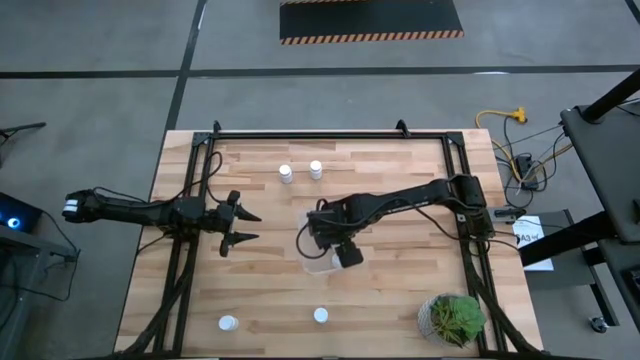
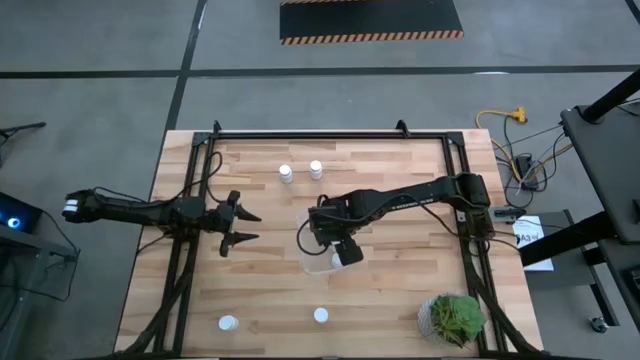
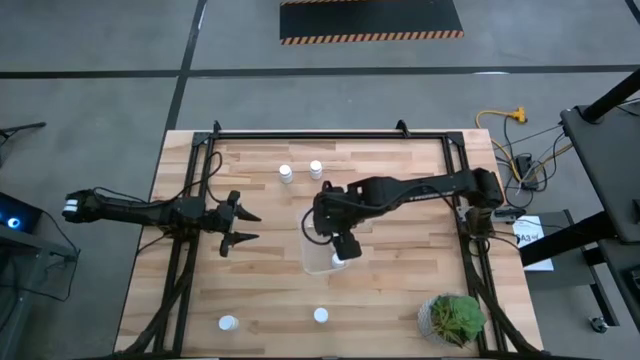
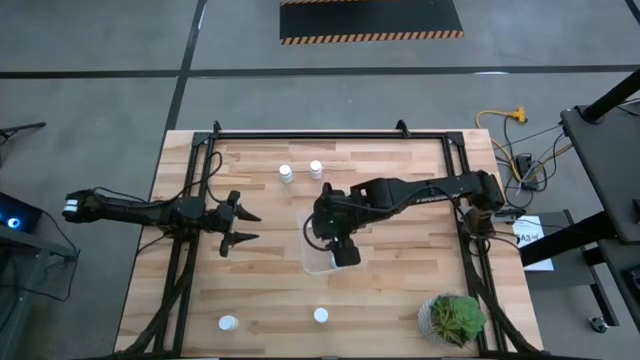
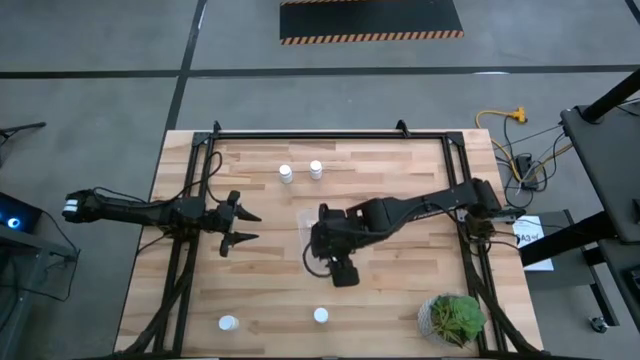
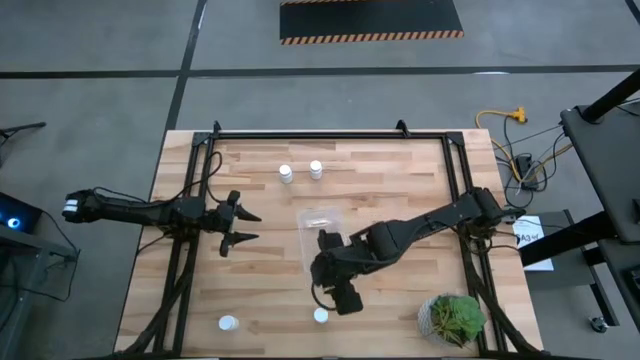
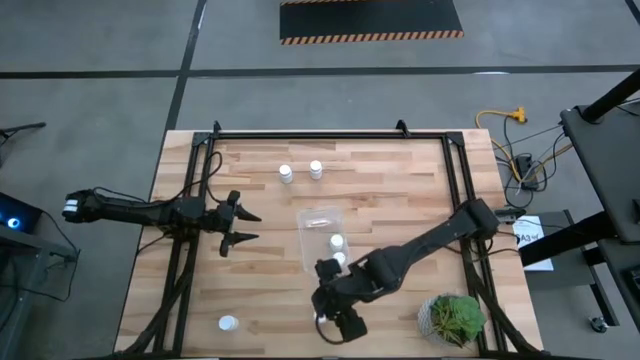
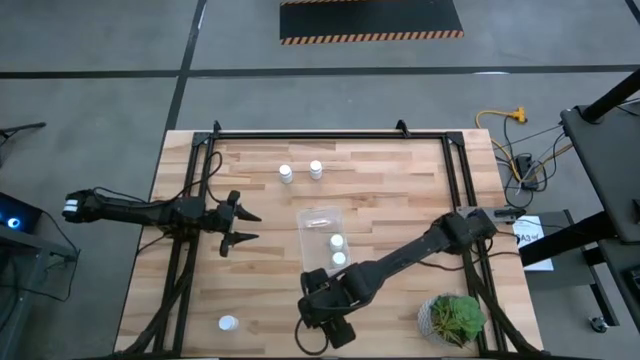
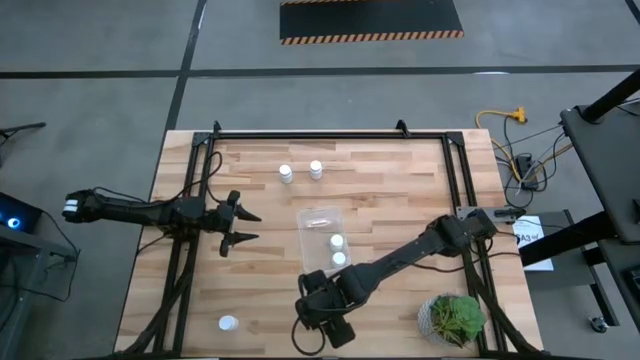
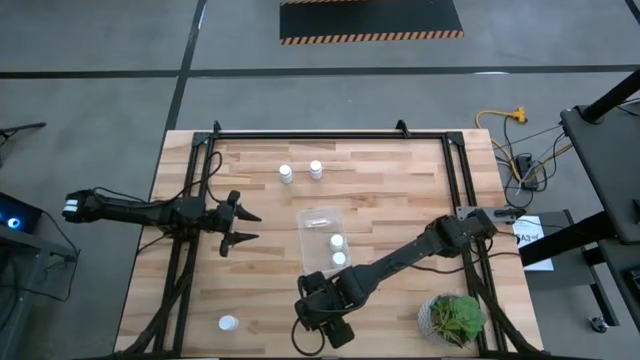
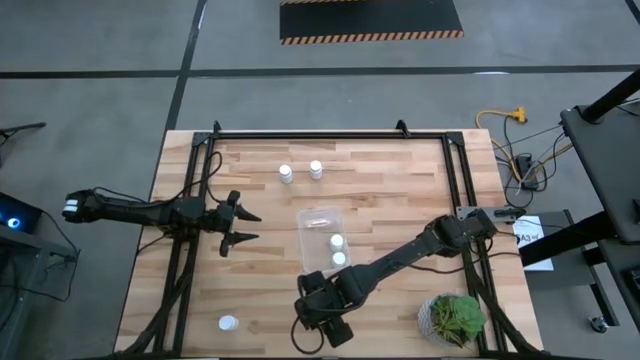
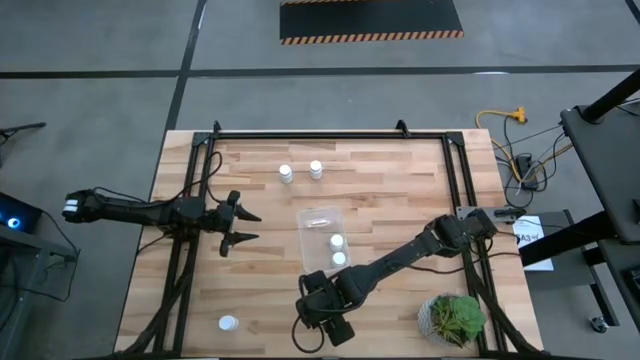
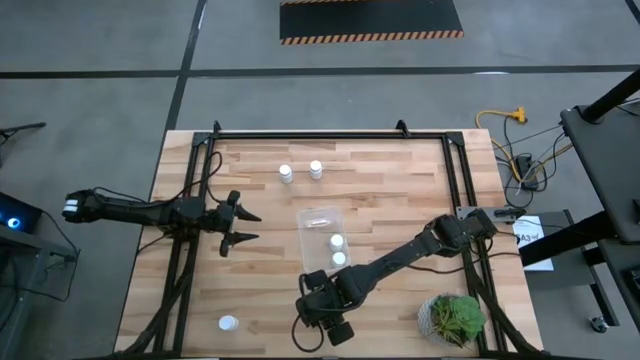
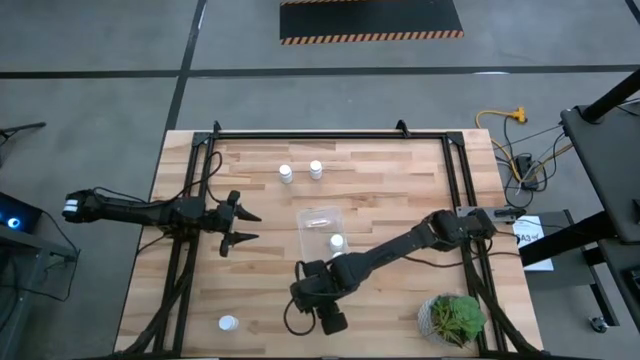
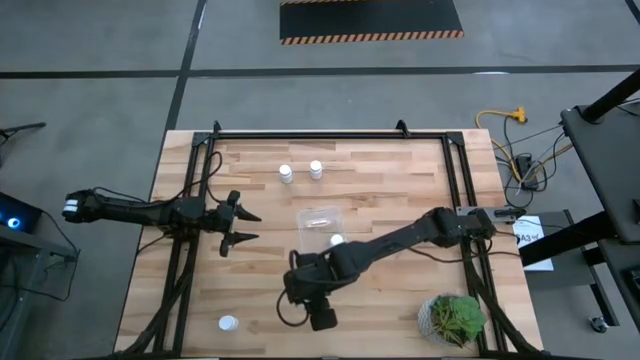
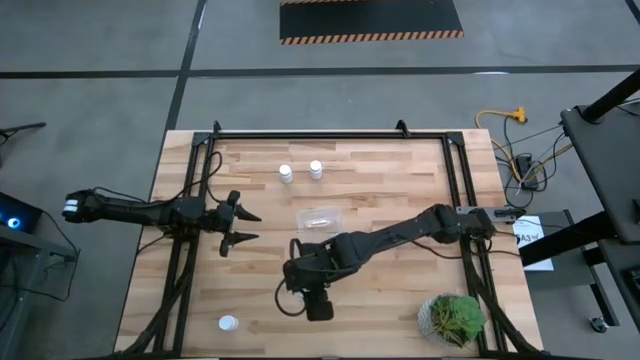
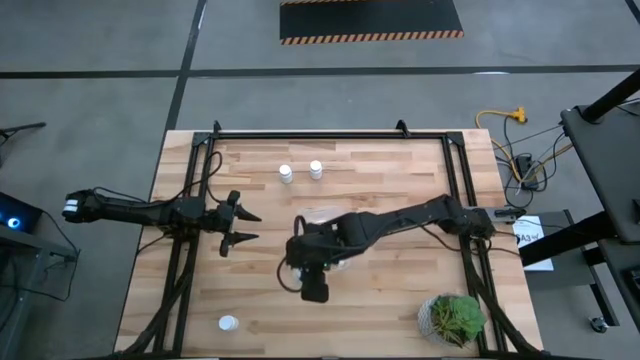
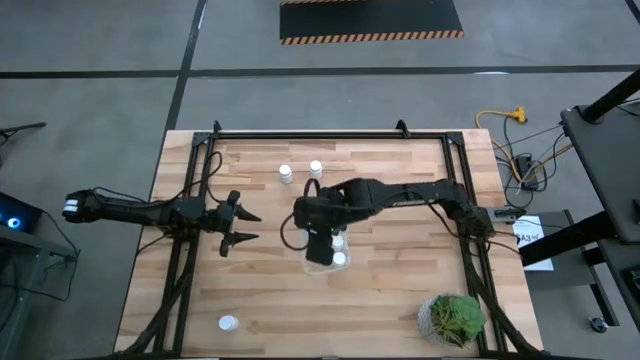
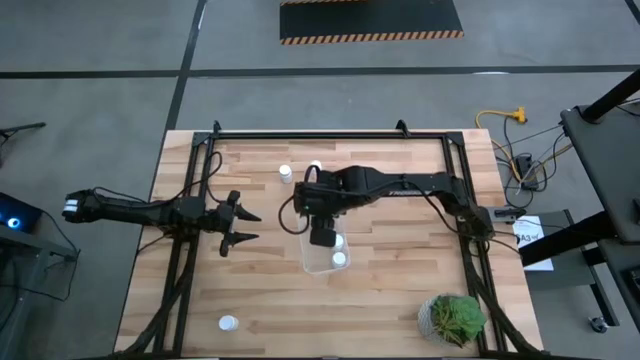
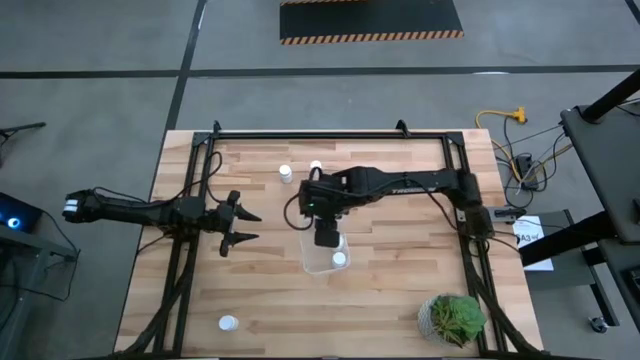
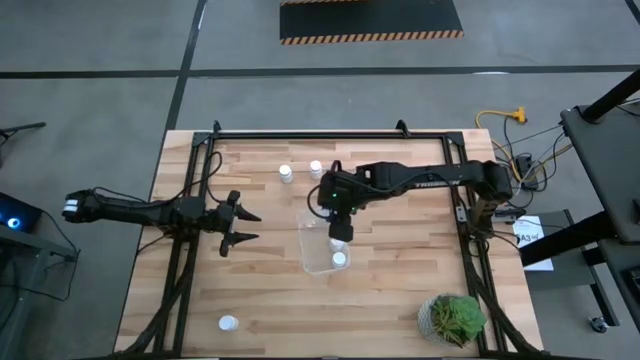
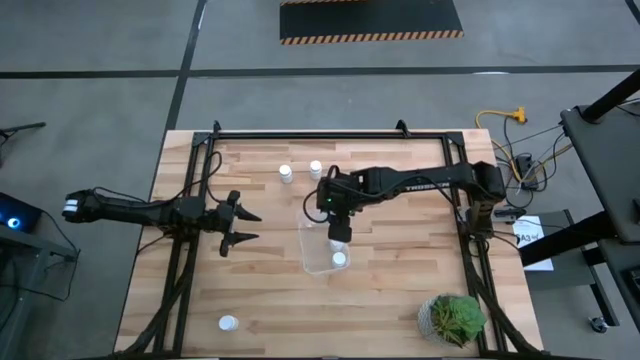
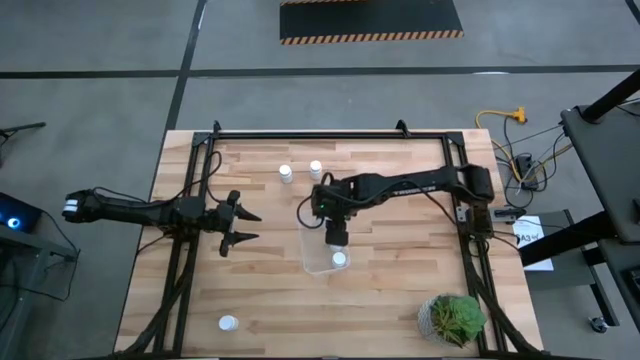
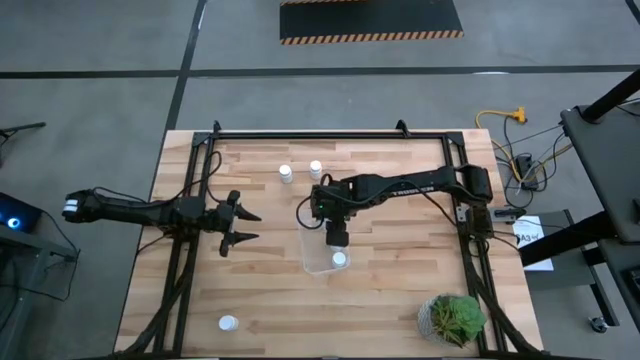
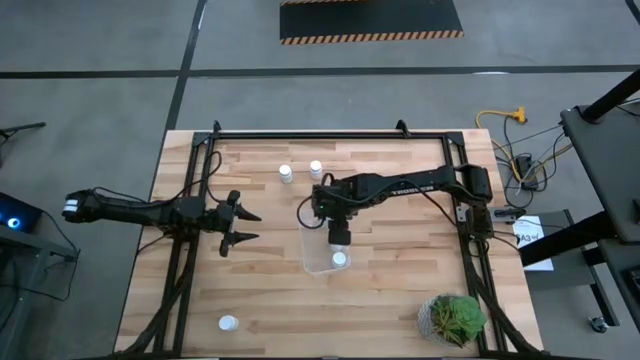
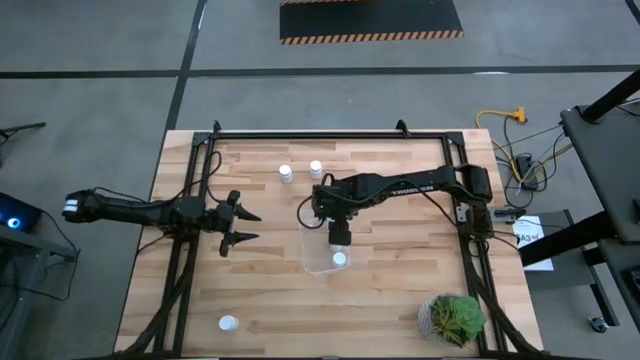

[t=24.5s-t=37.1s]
Task: Pick and place pill bottles into a basket
Put the white pill bottle into the transparent bin

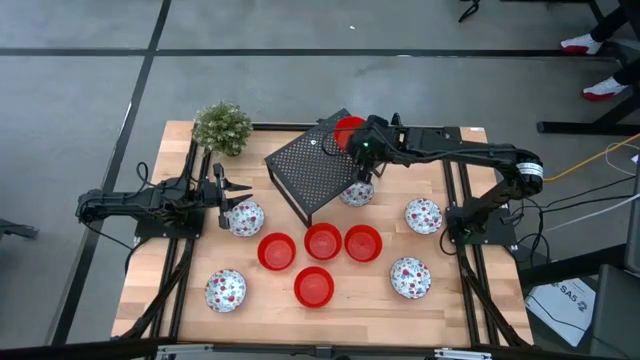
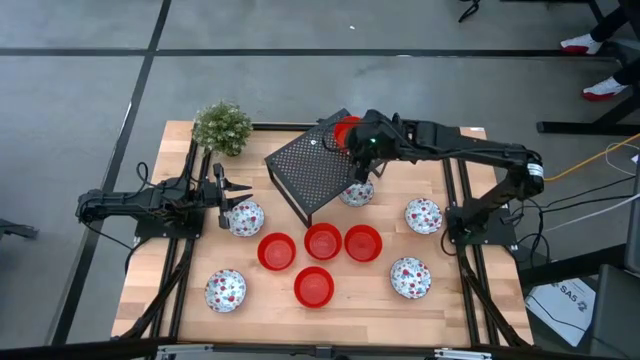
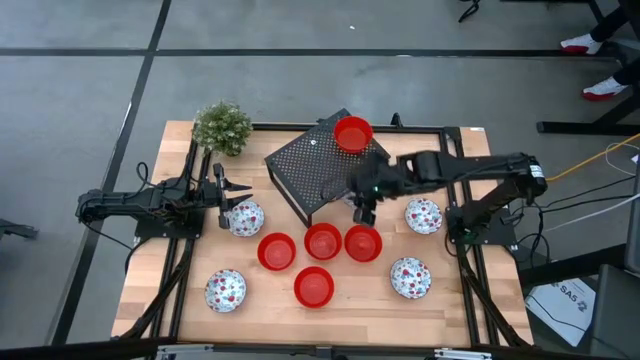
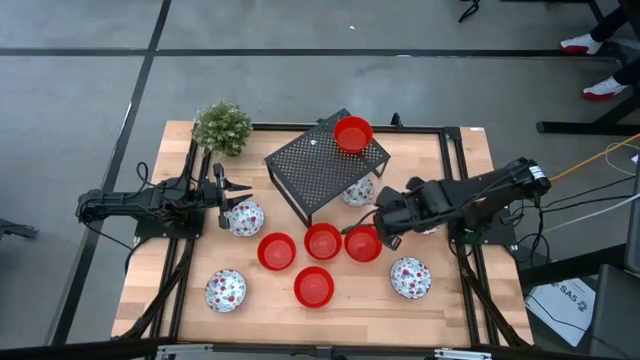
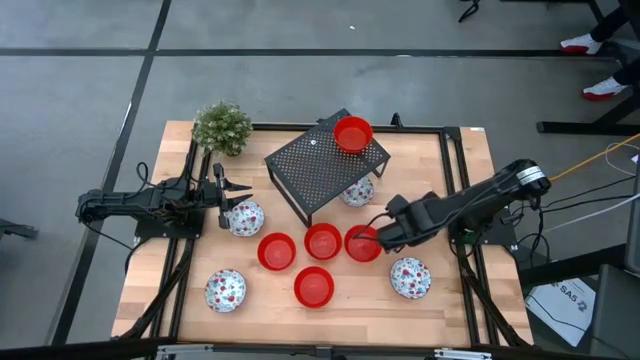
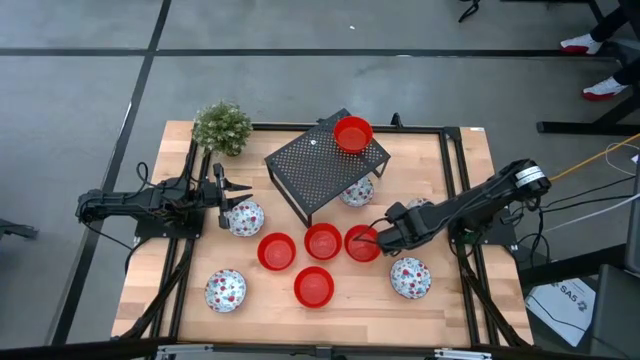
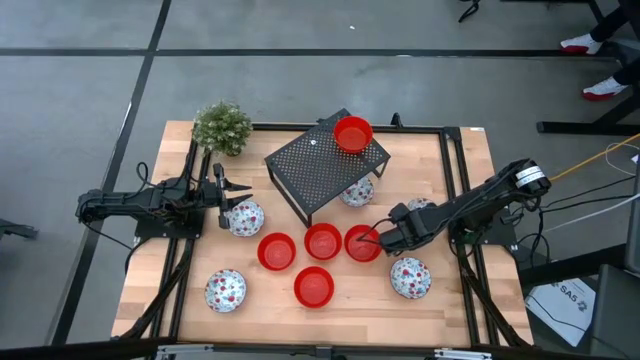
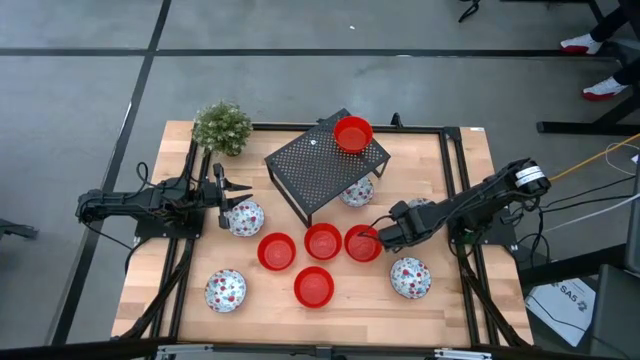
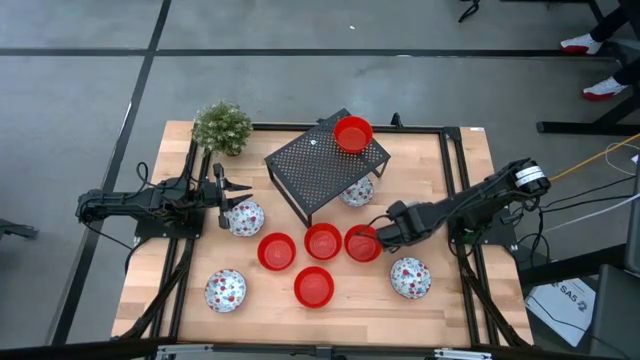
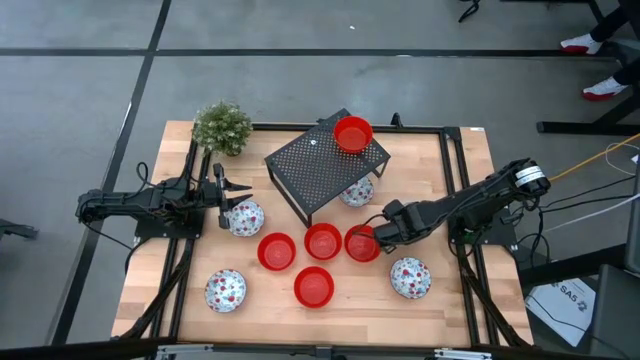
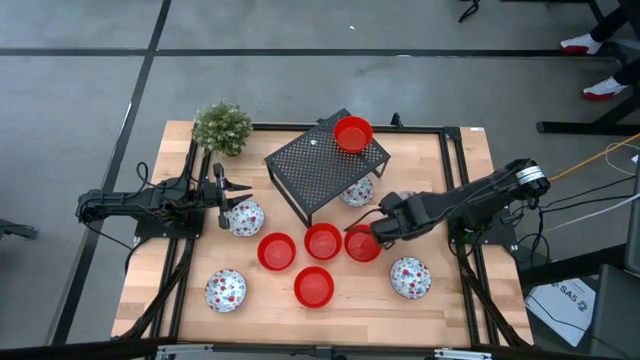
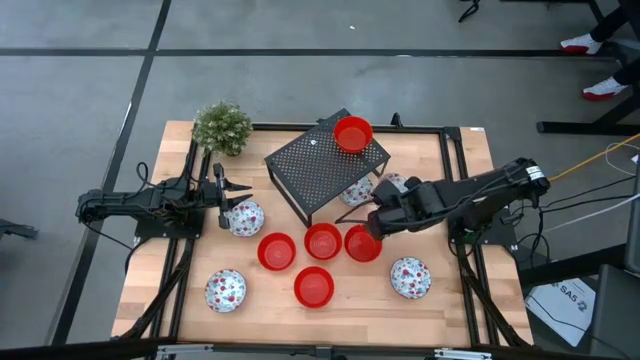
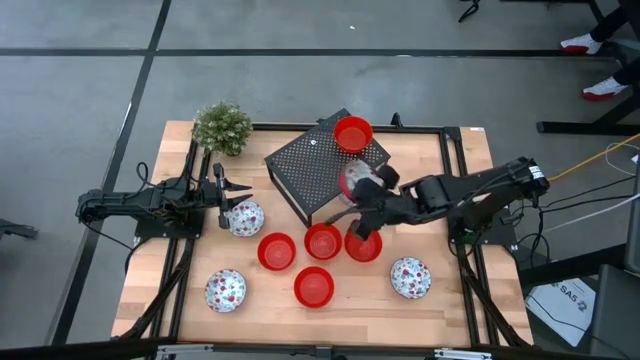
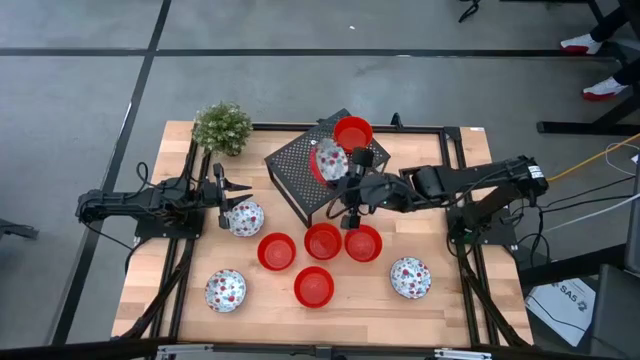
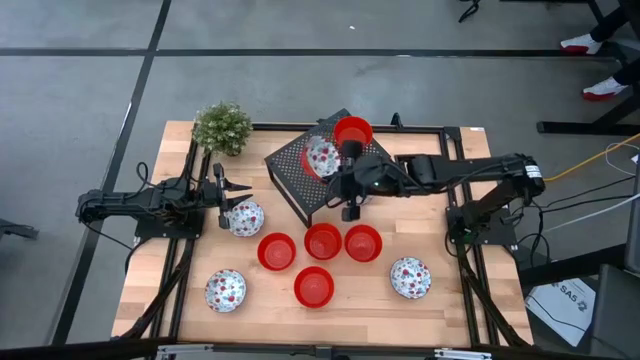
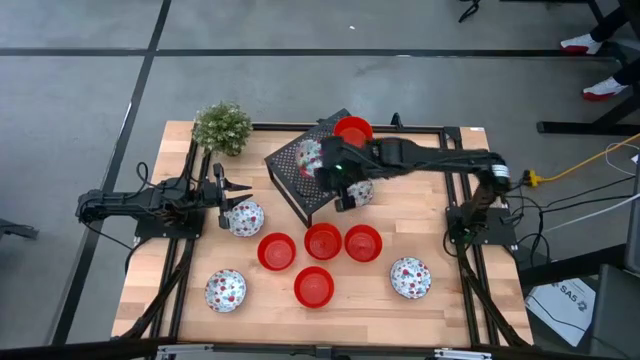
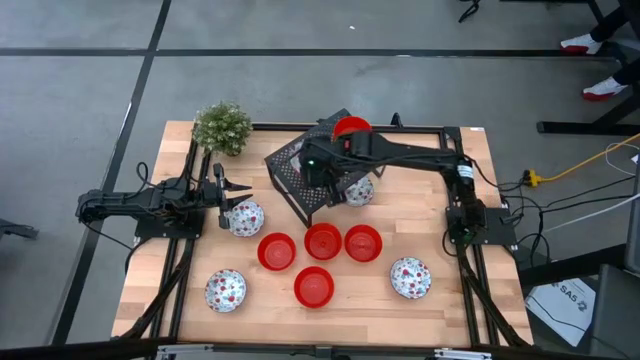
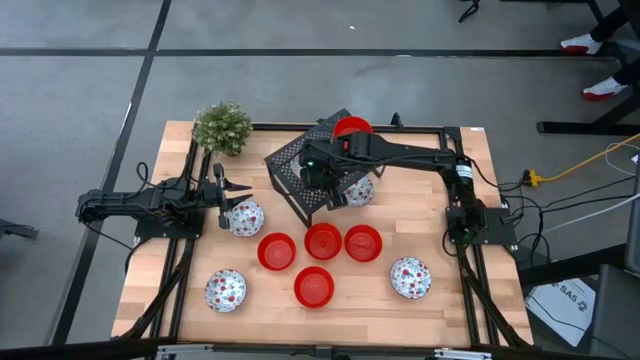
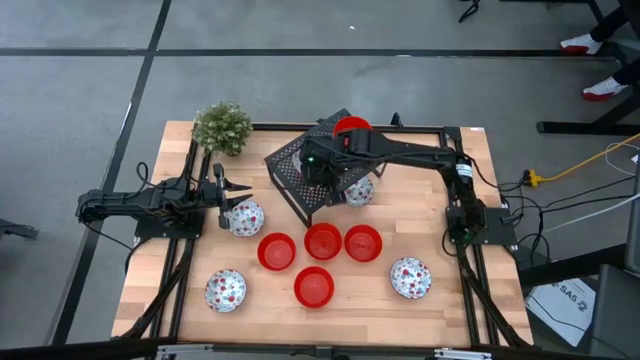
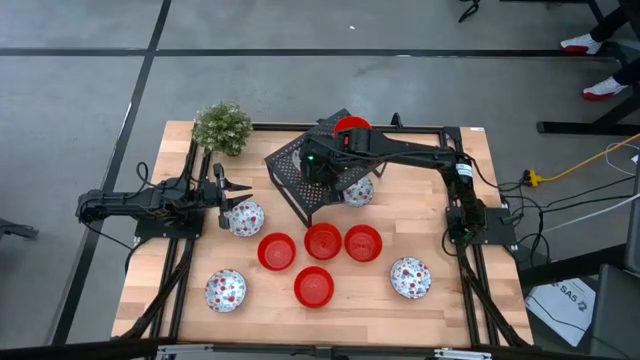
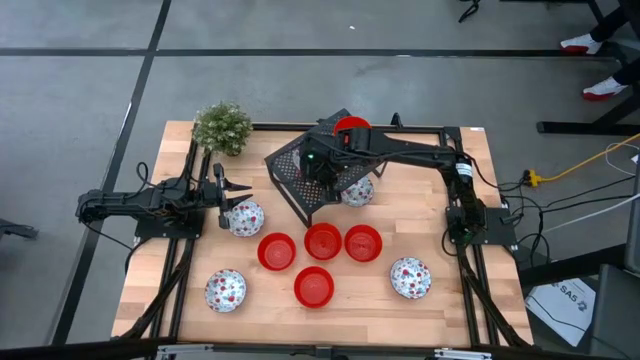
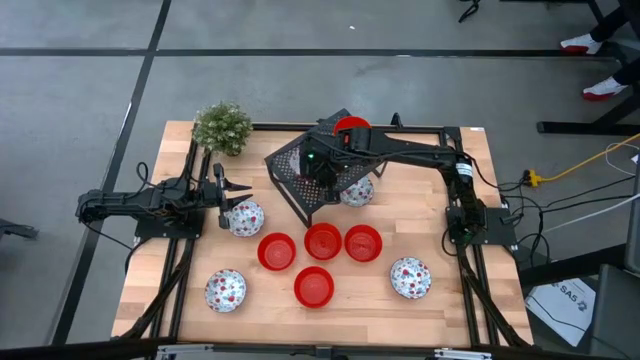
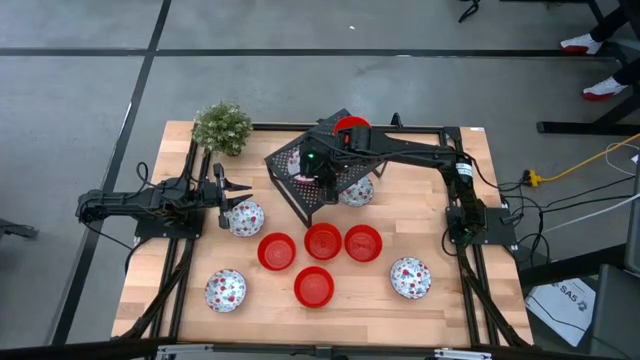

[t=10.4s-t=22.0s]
Task: Pick & Place Mini bowls
Put the white patterned bowl on the shelf
